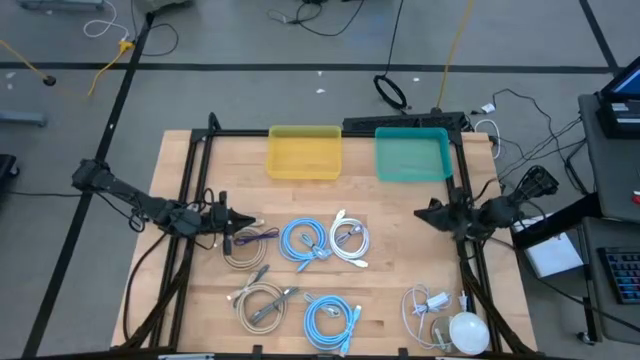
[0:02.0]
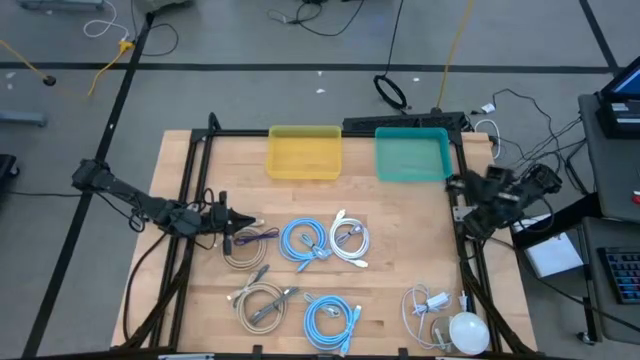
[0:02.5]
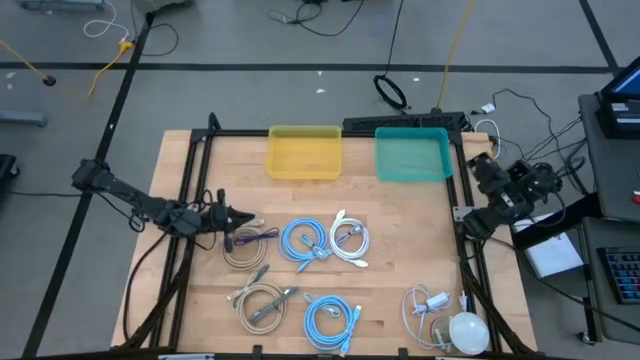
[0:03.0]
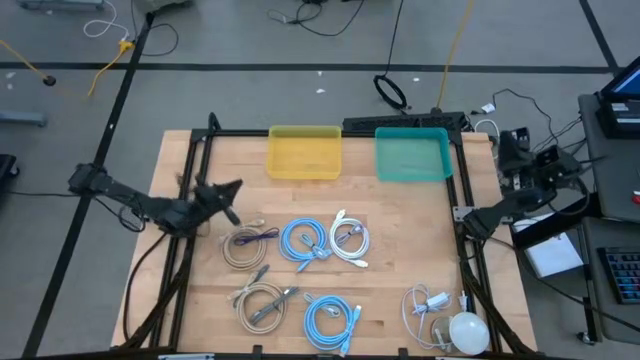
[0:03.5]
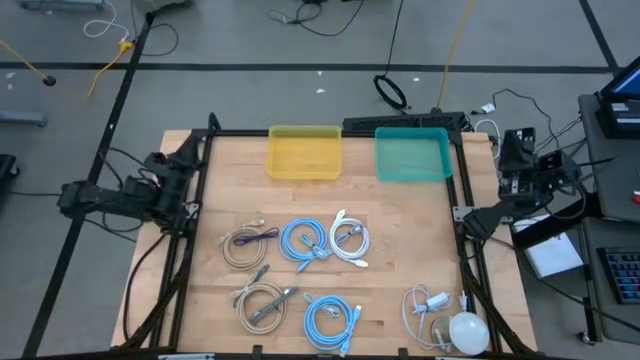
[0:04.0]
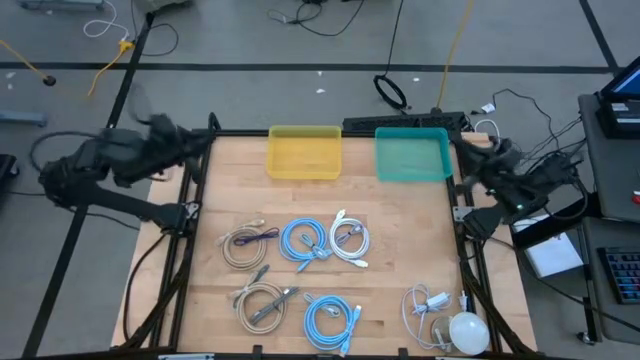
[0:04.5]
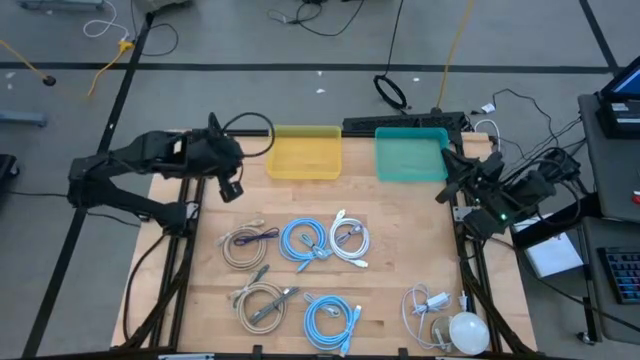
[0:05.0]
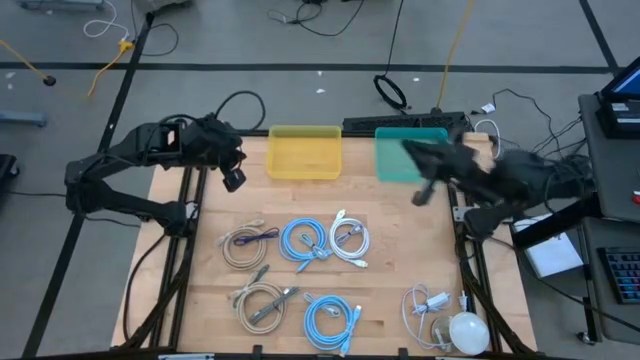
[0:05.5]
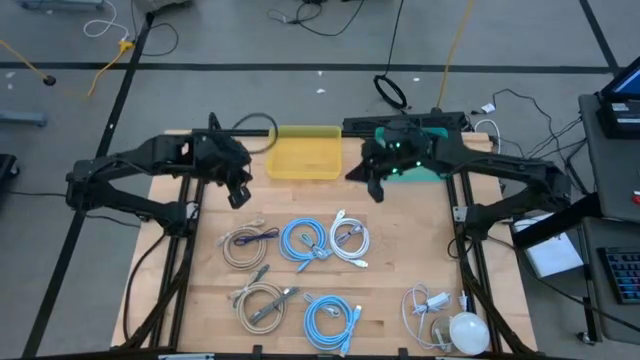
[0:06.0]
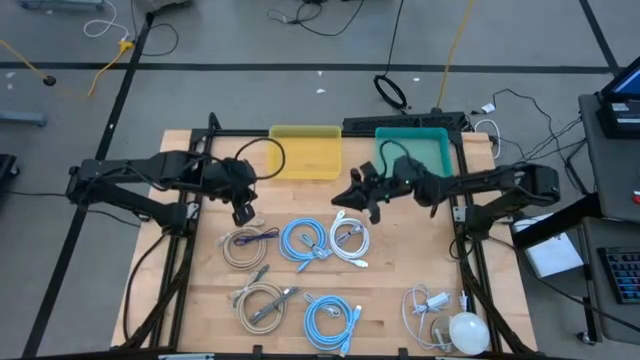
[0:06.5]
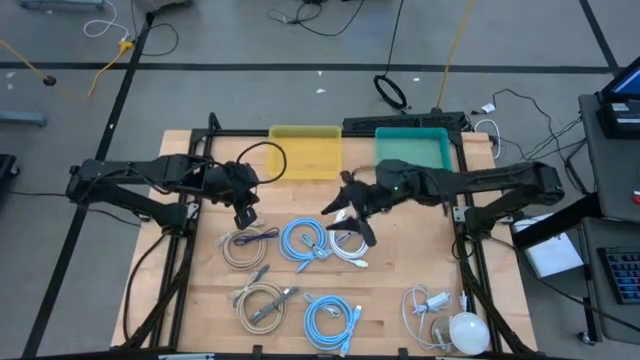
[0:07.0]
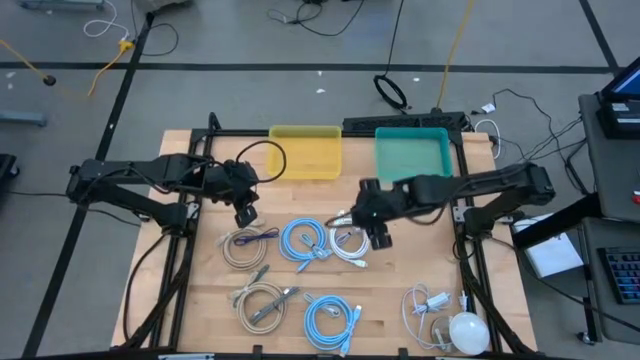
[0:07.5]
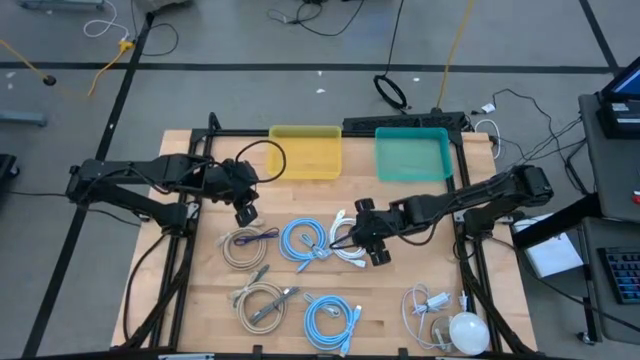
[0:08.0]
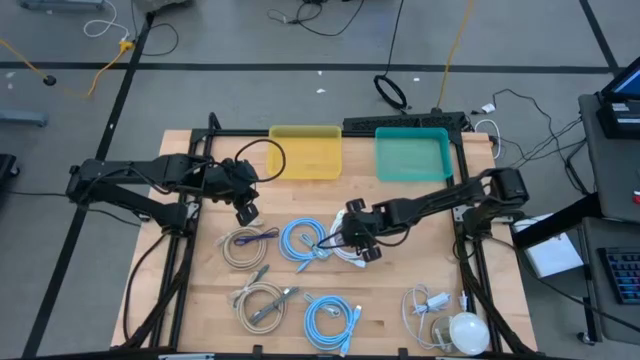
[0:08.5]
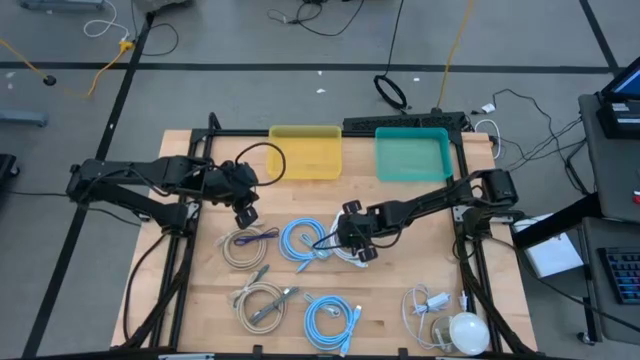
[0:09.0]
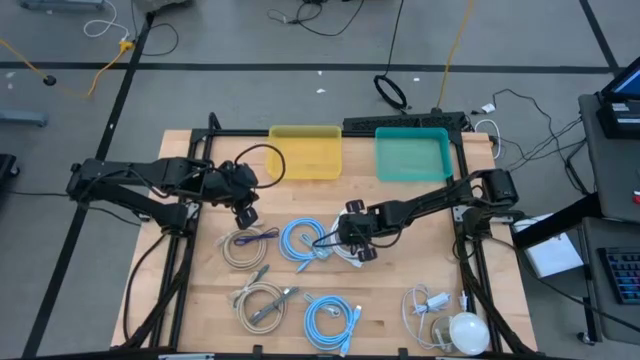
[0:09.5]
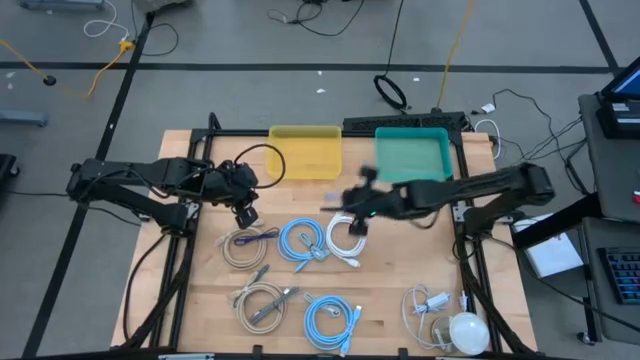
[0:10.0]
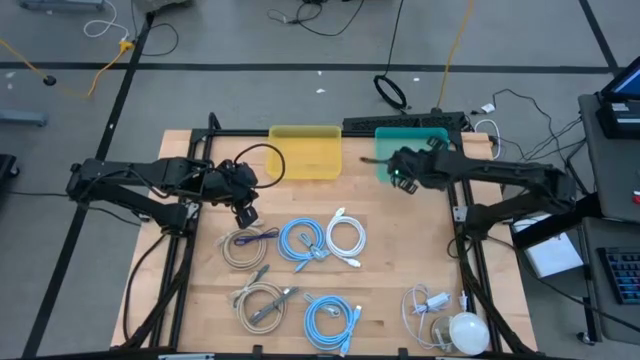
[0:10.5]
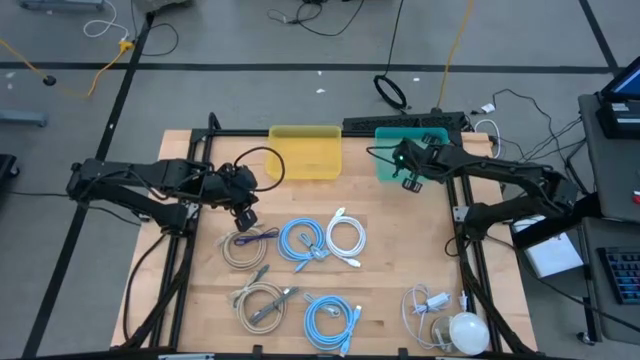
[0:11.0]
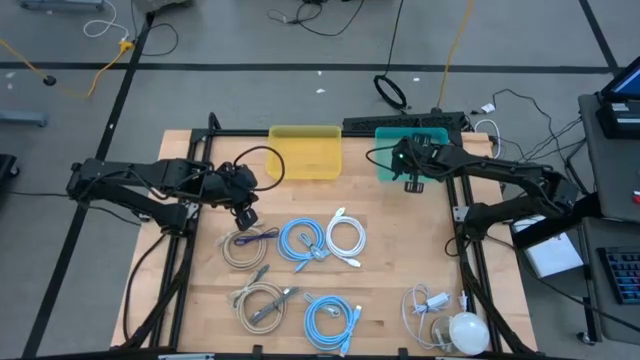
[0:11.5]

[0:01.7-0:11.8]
Task: Pick & Place USB Port
Put the top gray charger cable into the green bin

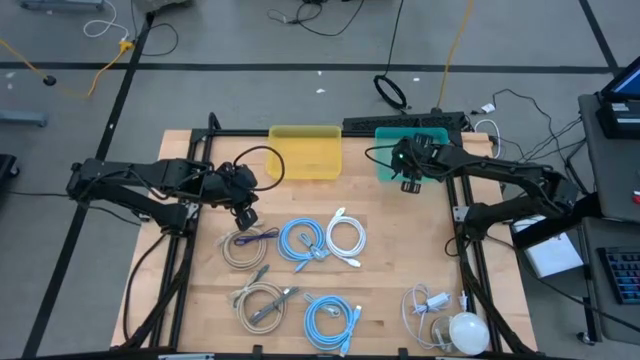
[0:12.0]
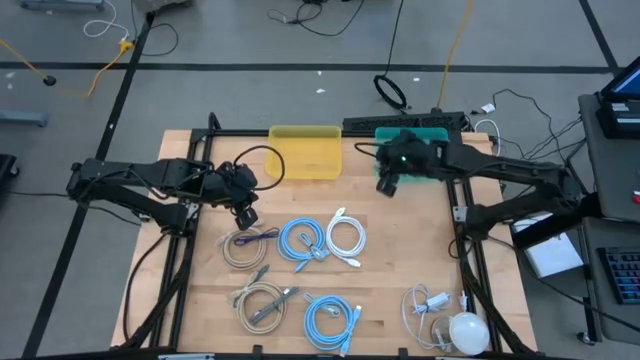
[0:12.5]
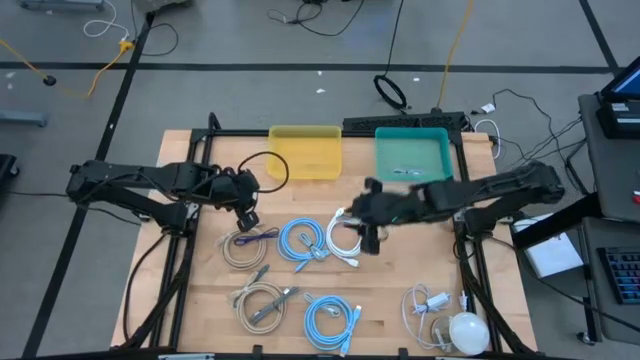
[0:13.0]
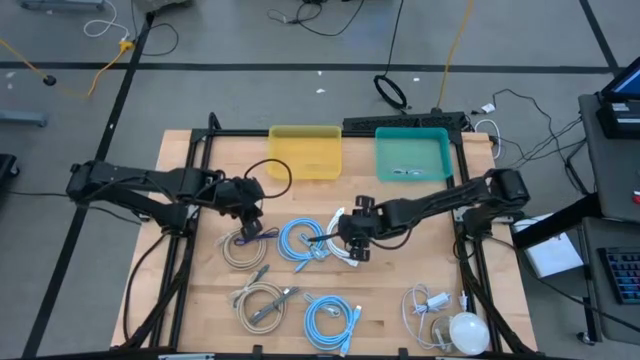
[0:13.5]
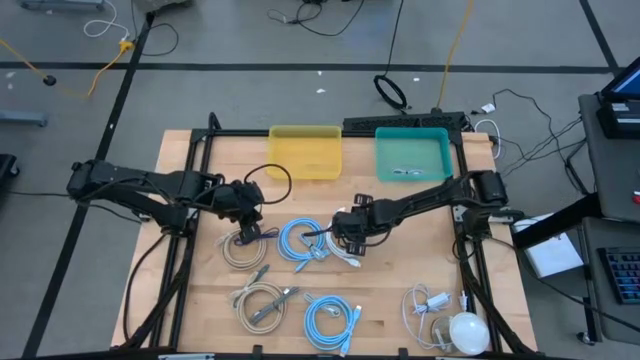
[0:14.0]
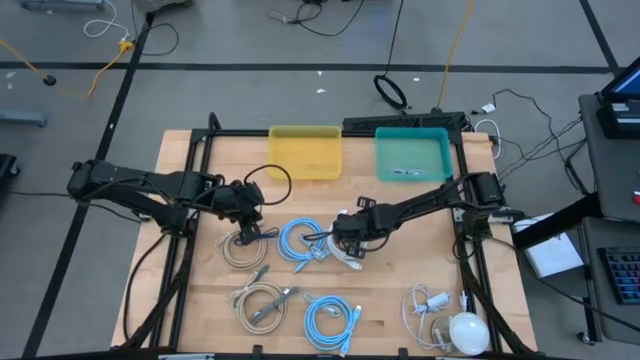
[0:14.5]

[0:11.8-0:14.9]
Put the white charger cable into the yellow bin

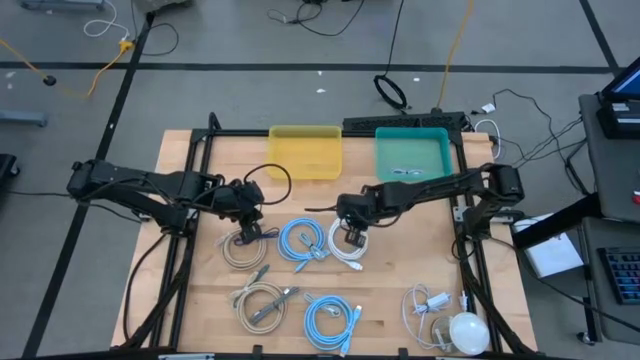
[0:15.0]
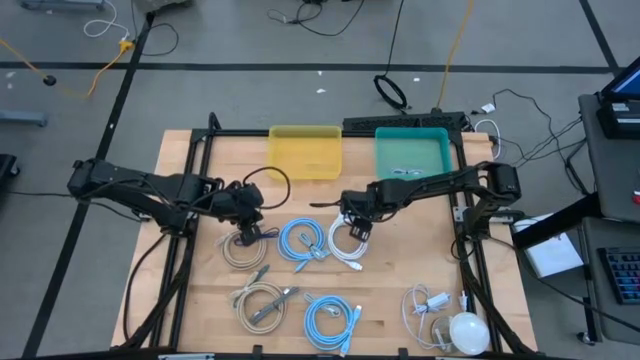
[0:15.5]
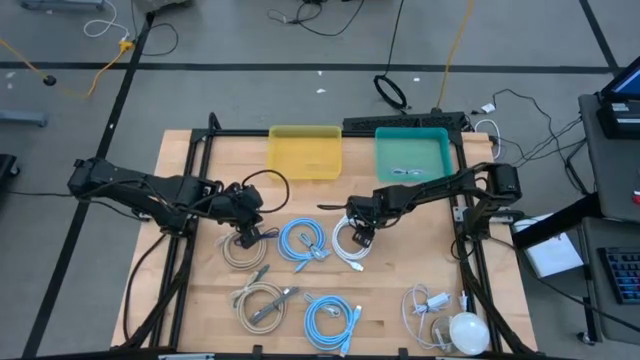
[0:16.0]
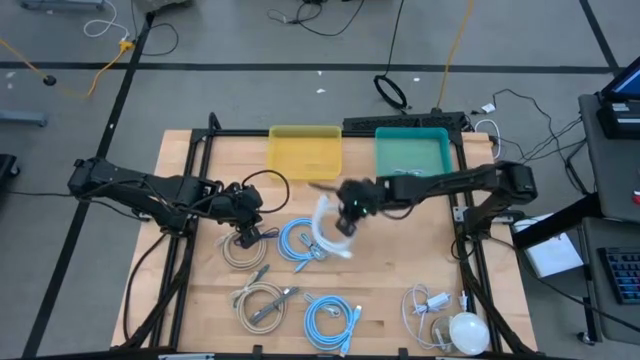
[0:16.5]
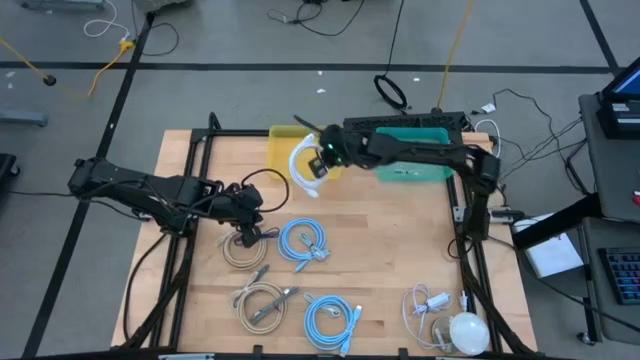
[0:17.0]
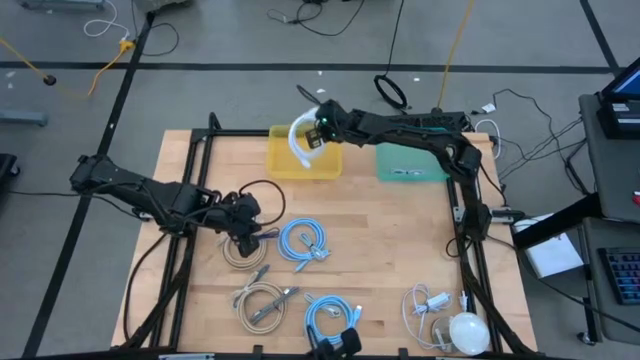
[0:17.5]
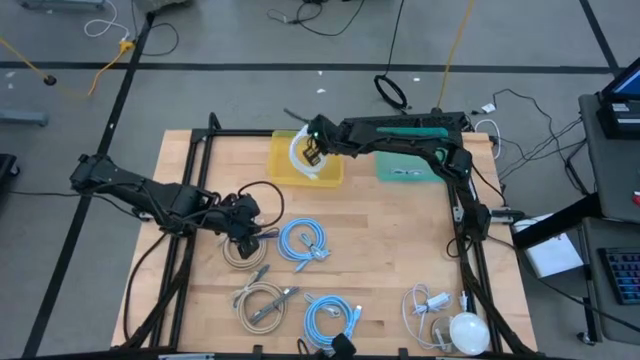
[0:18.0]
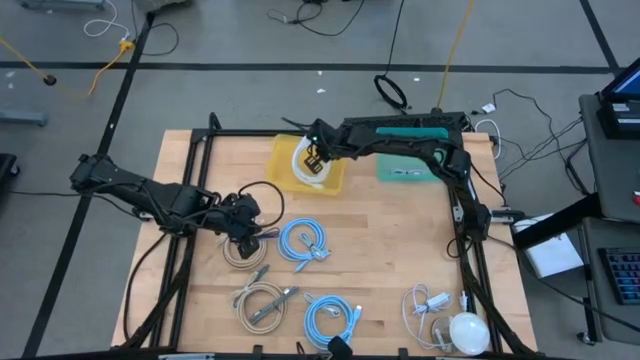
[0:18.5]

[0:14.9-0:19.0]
Put the white charger cable into the yellow bin

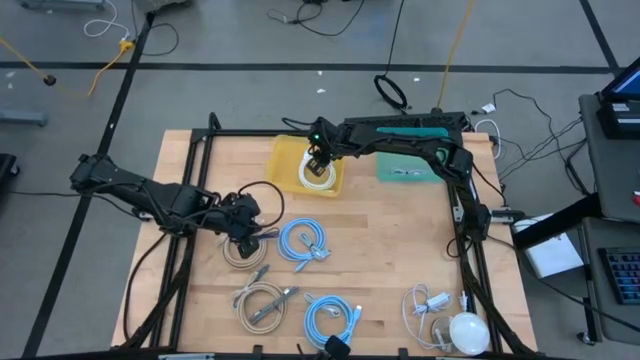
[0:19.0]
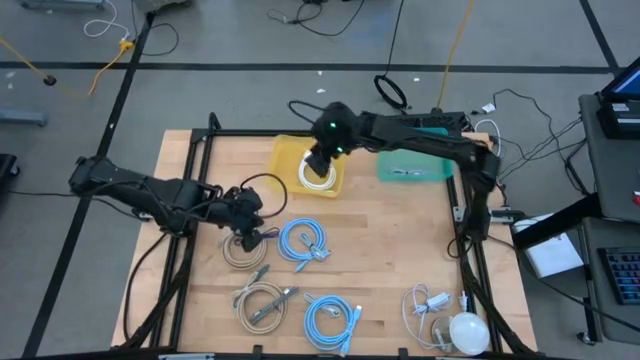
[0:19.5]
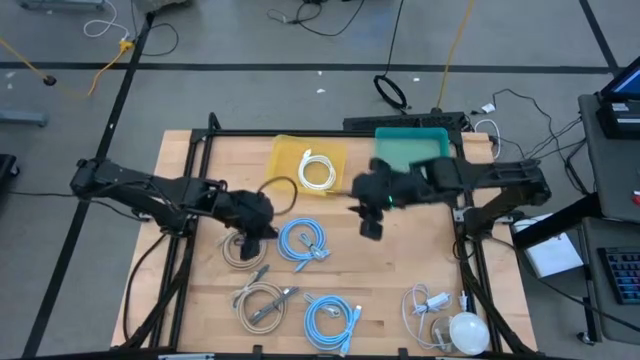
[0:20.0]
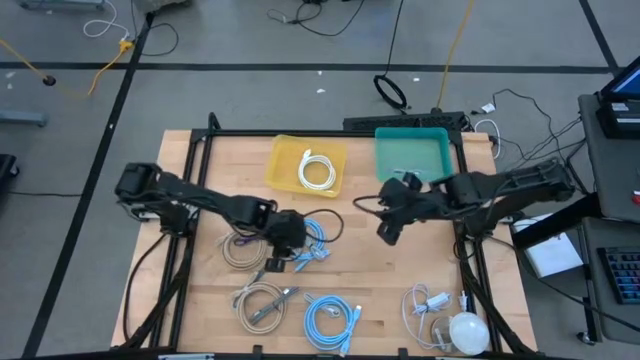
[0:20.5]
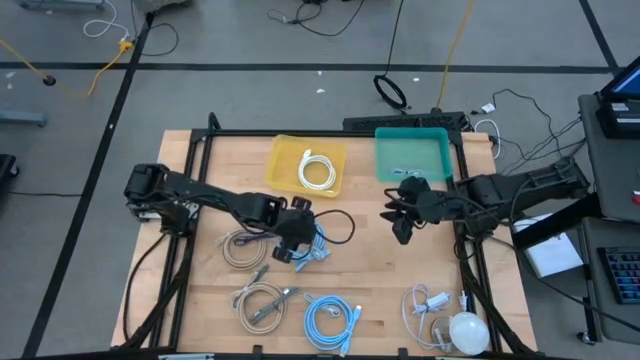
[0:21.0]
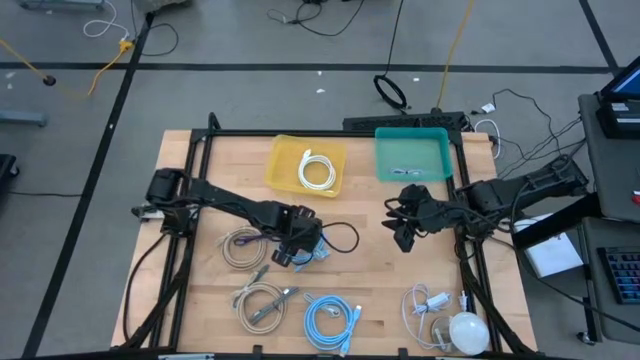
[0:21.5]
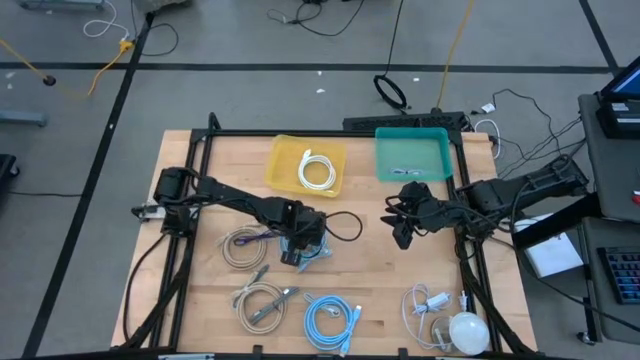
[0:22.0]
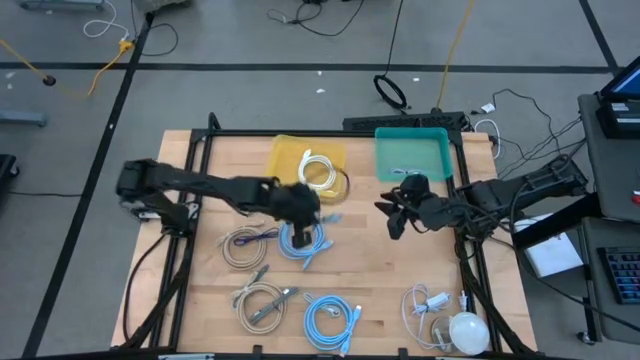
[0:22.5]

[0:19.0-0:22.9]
Put the light blue charger cable into the green bin
